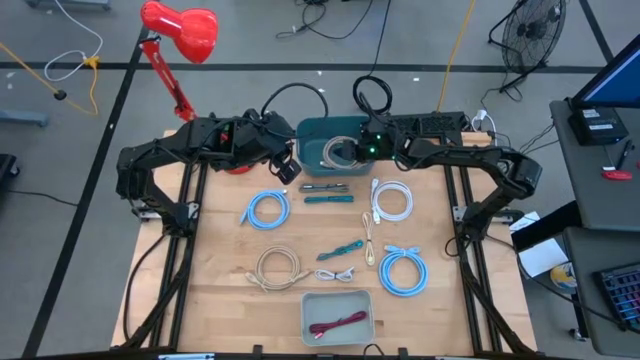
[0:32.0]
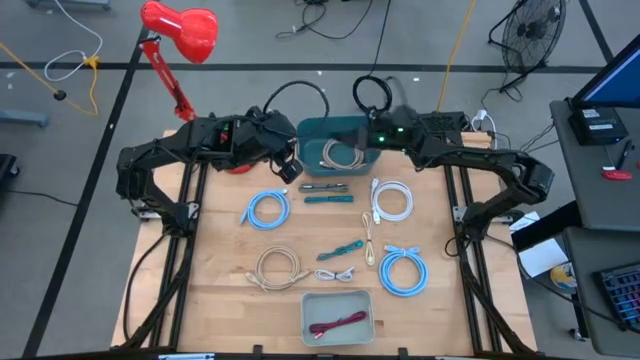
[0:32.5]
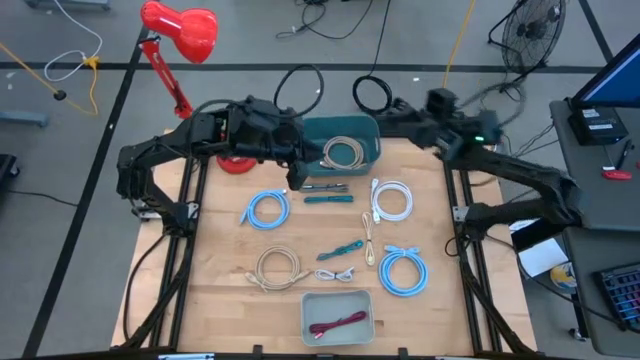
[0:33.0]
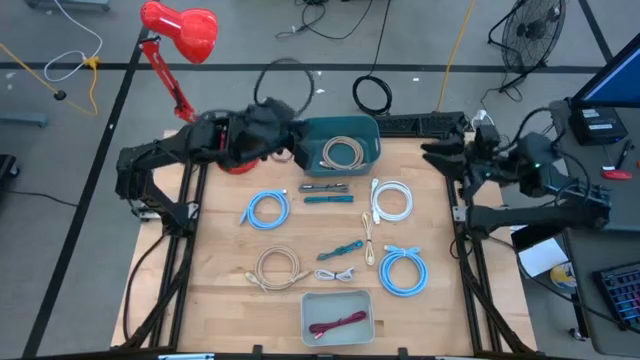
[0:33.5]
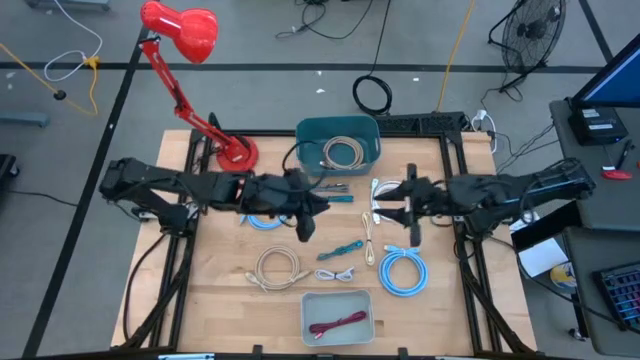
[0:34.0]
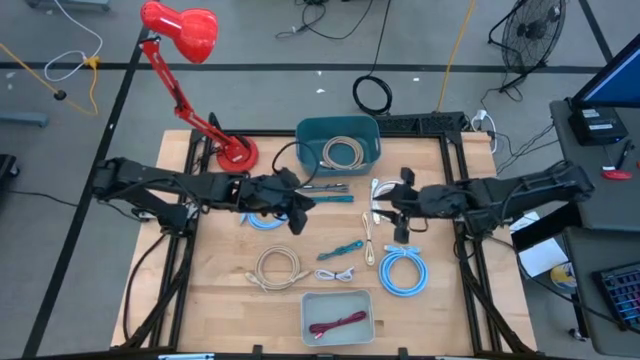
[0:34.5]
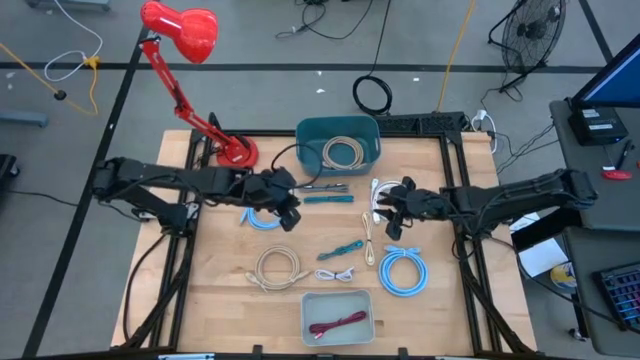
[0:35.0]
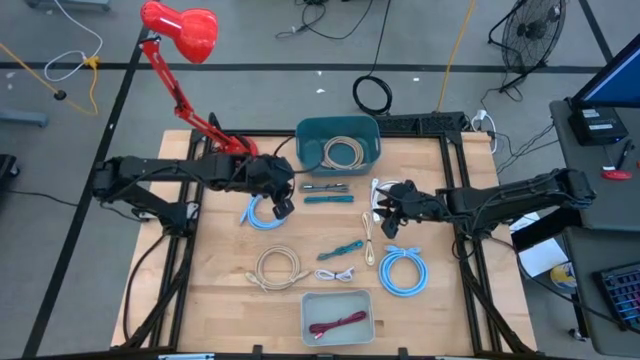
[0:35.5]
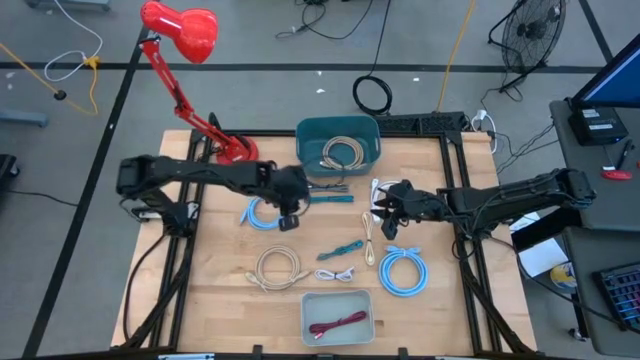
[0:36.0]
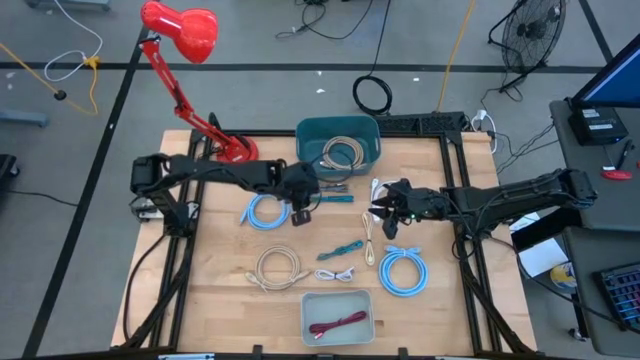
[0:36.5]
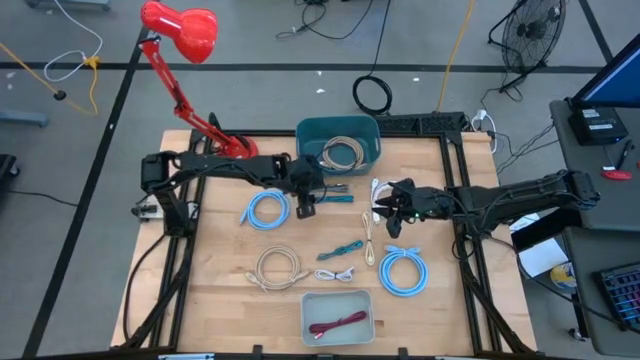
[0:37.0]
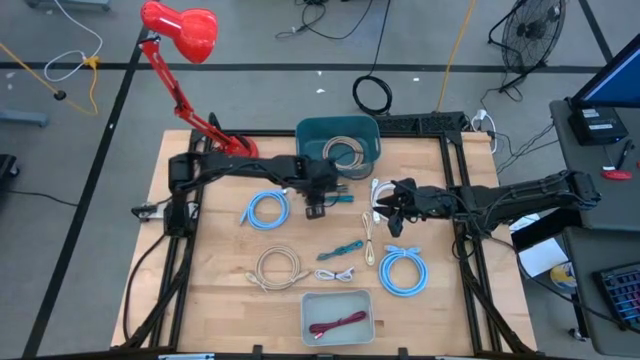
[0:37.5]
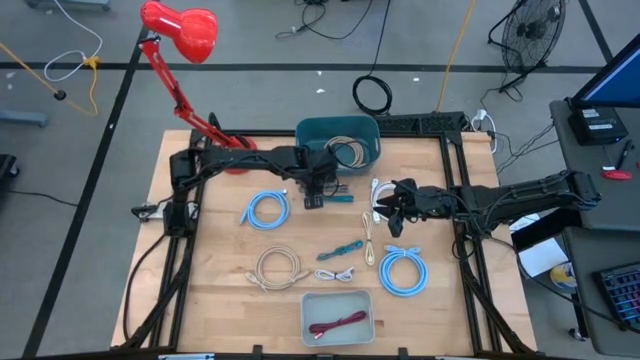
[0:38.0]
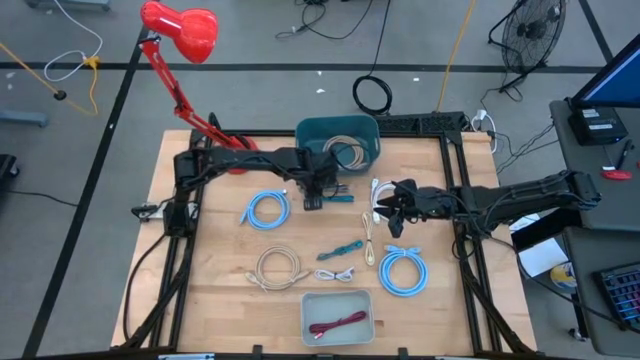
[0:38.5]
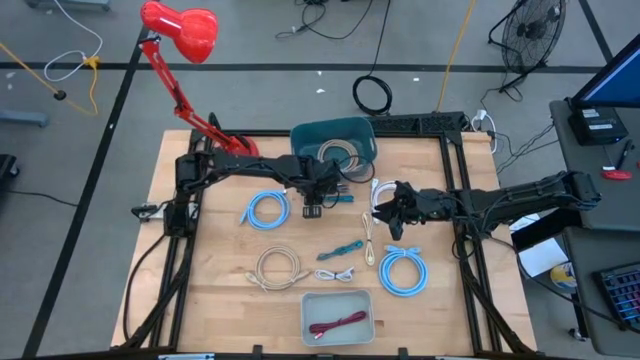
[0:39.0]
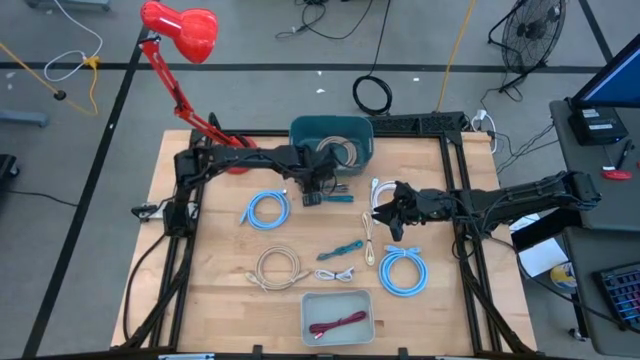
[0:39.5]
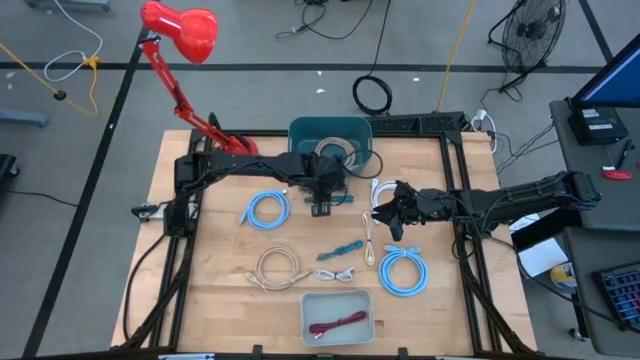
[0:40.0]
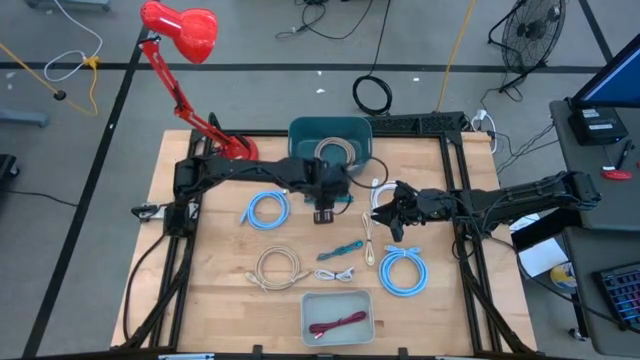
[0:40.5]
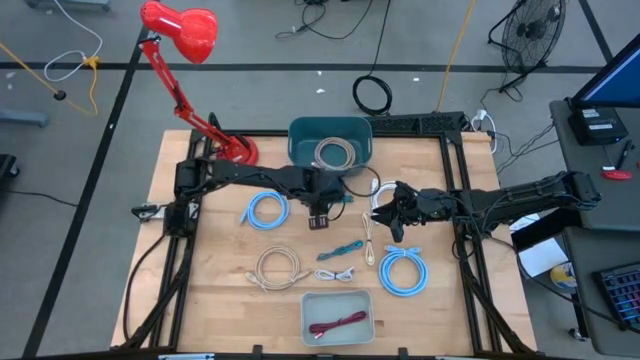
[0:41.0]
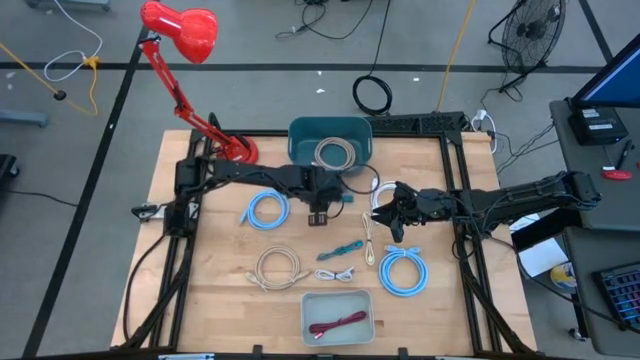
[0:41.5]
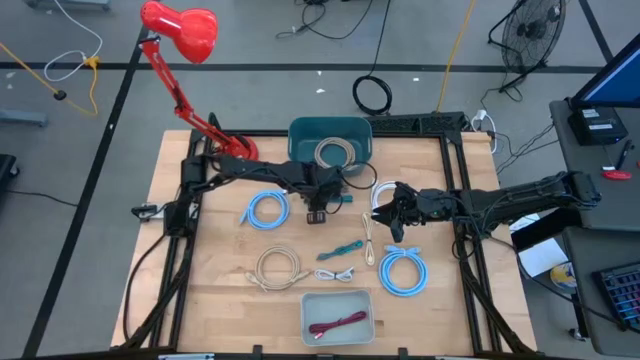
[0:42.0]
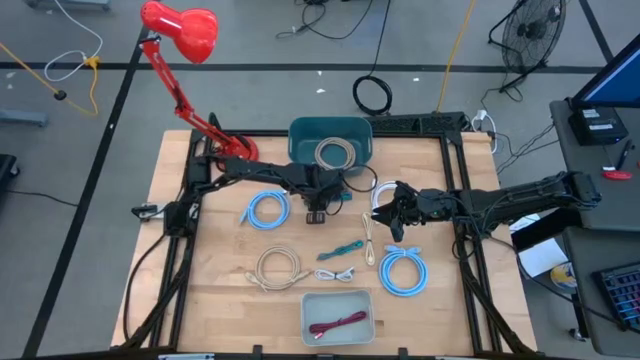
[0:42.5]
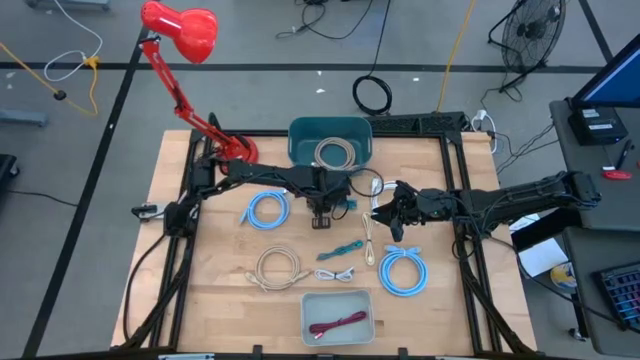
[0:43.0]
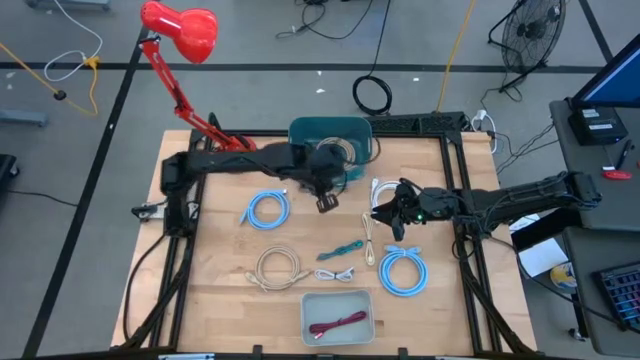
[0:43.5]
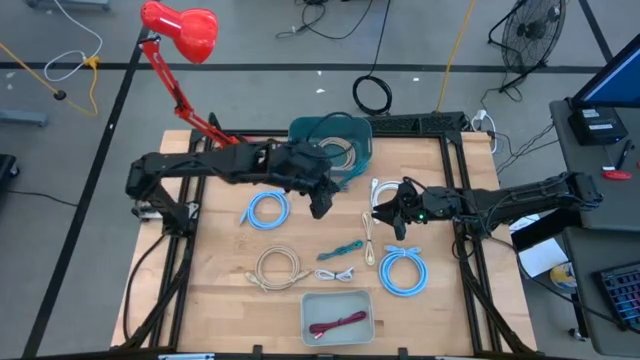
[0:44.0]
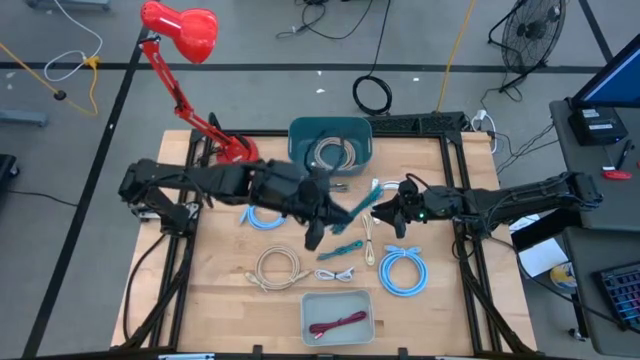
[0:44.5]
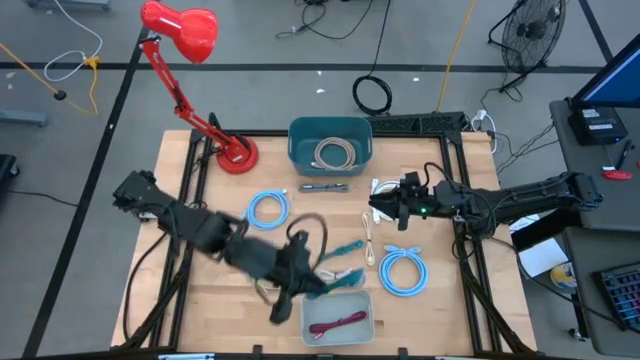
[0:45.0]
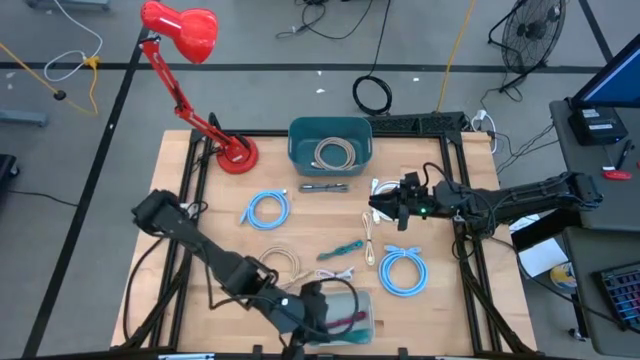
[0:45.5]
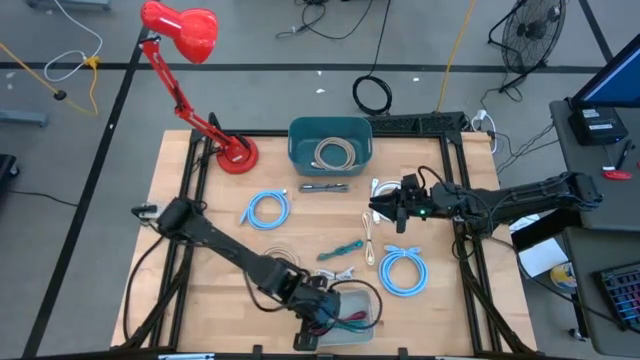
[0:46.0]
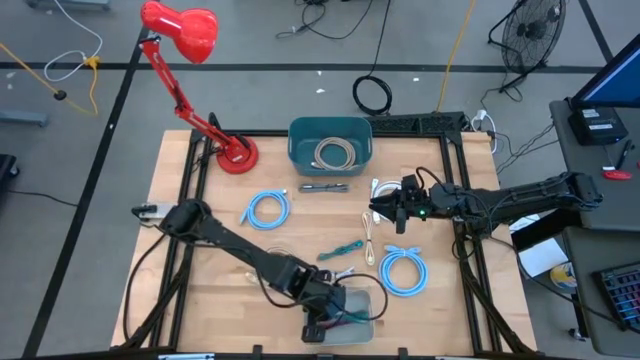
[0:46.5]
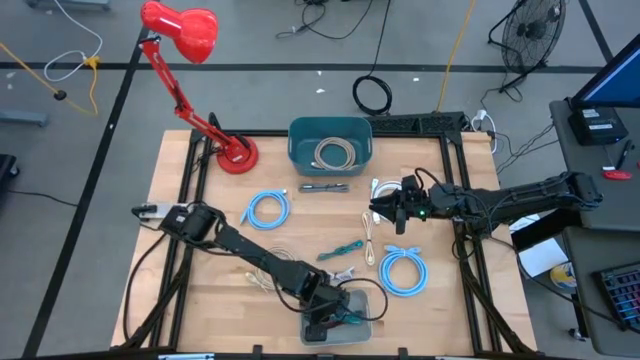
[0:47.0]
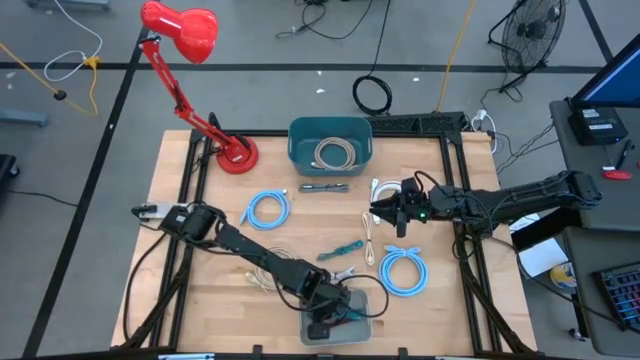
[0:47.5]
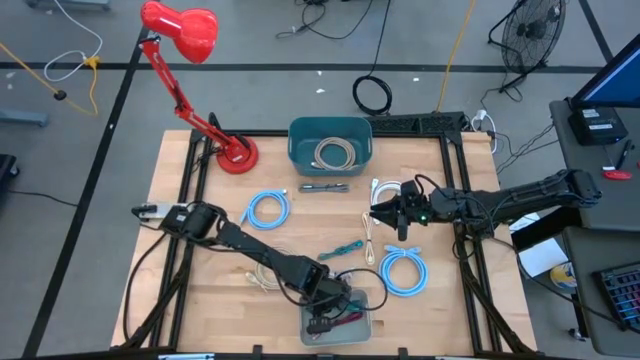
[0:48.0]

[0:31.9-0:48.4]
Task: Pick & Place USB Port
Put the top blue charger cable into the gray bin
